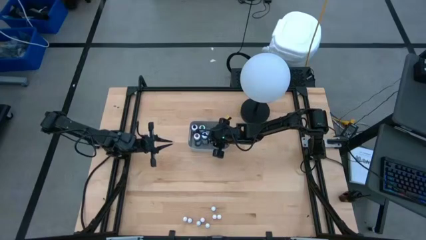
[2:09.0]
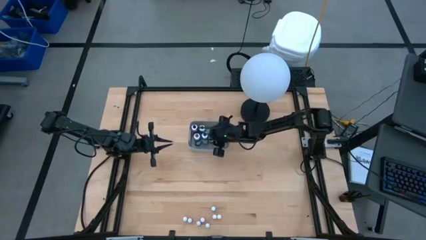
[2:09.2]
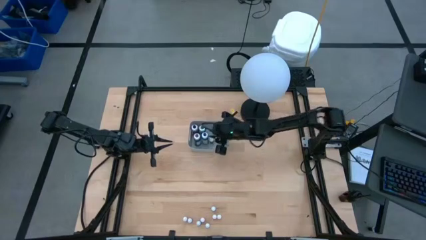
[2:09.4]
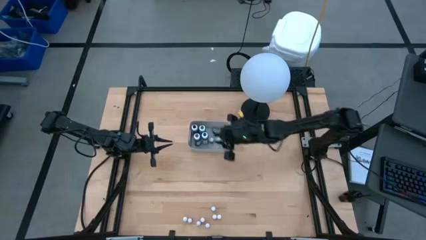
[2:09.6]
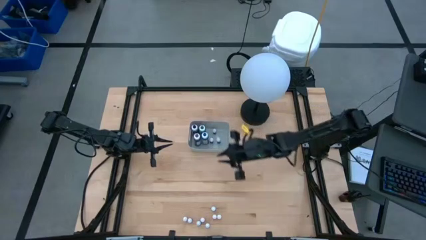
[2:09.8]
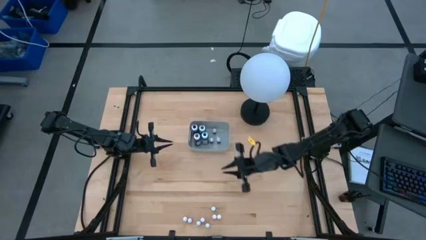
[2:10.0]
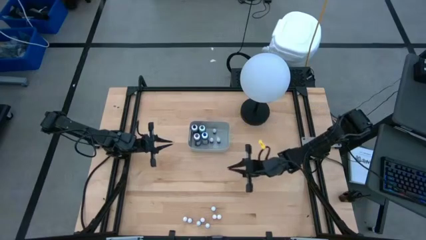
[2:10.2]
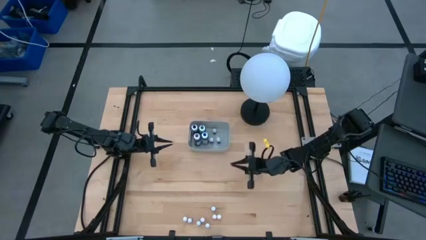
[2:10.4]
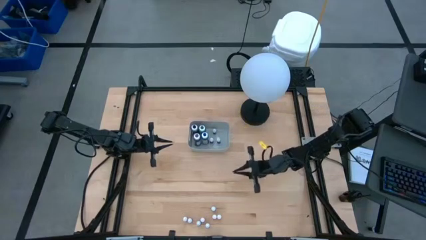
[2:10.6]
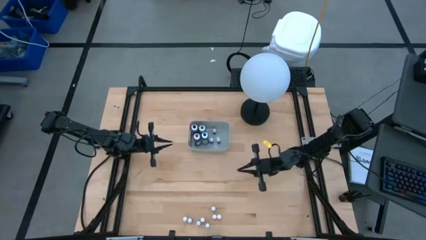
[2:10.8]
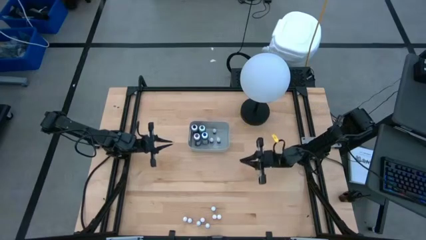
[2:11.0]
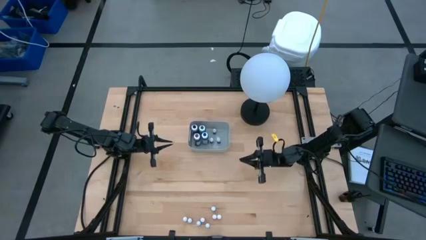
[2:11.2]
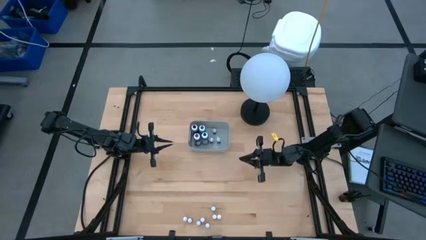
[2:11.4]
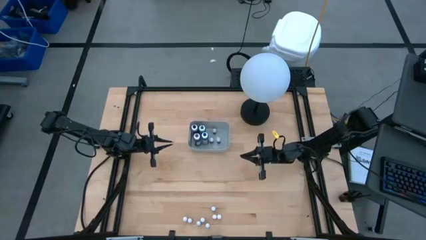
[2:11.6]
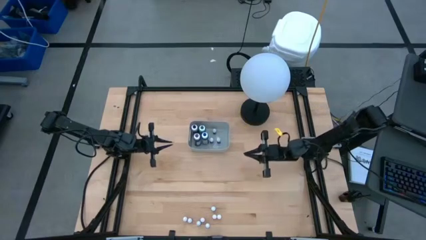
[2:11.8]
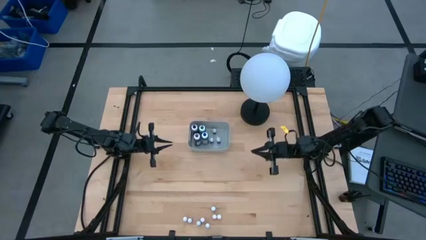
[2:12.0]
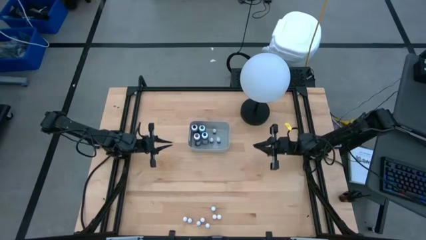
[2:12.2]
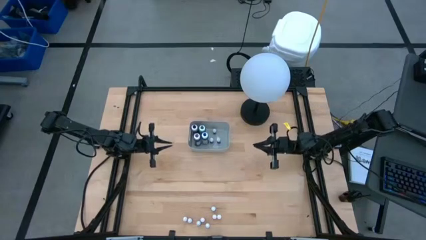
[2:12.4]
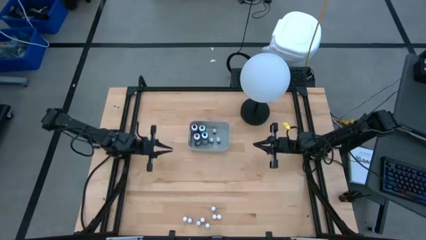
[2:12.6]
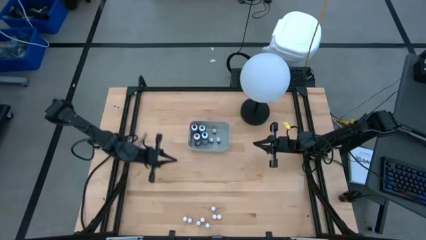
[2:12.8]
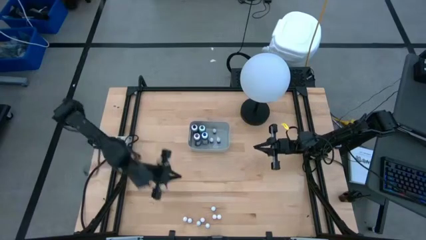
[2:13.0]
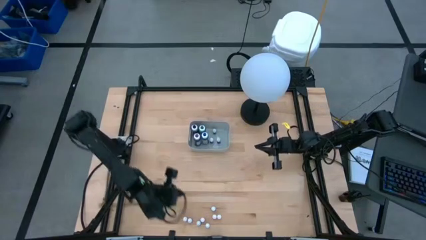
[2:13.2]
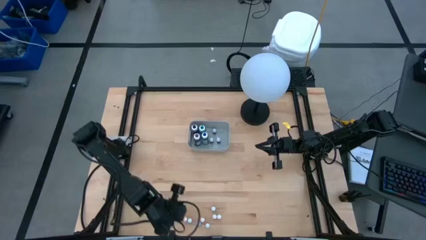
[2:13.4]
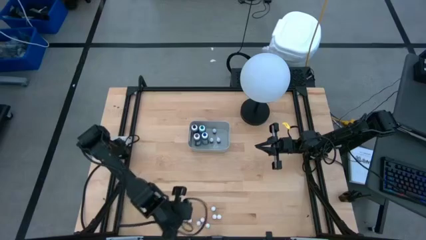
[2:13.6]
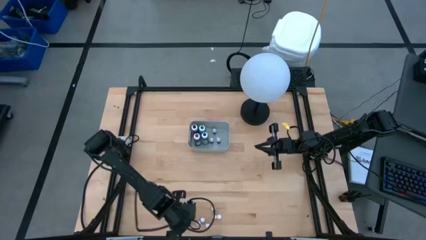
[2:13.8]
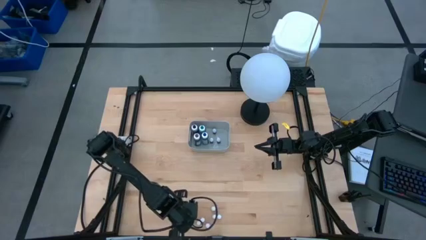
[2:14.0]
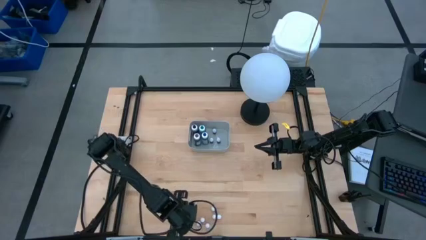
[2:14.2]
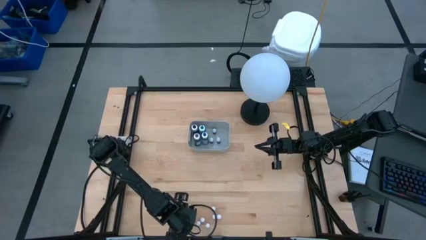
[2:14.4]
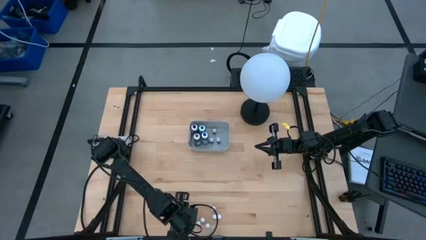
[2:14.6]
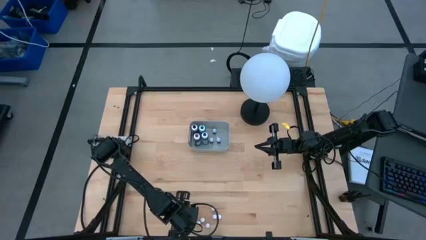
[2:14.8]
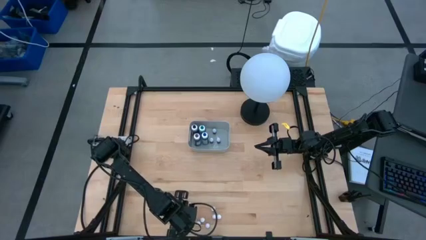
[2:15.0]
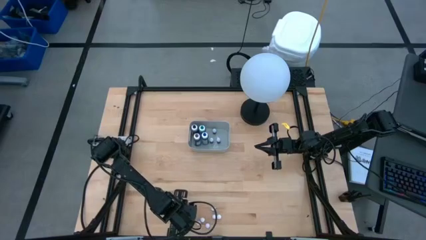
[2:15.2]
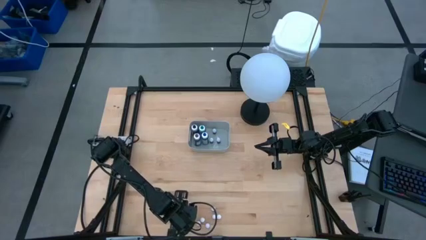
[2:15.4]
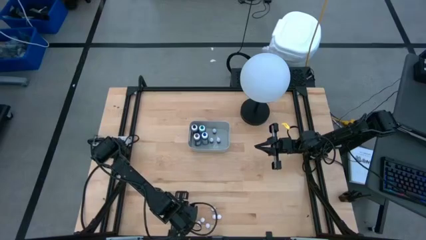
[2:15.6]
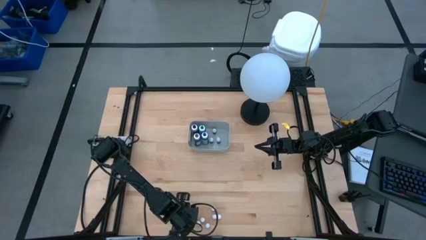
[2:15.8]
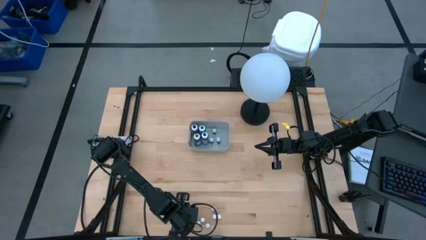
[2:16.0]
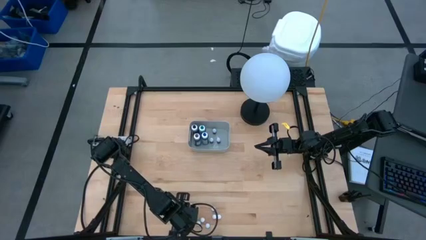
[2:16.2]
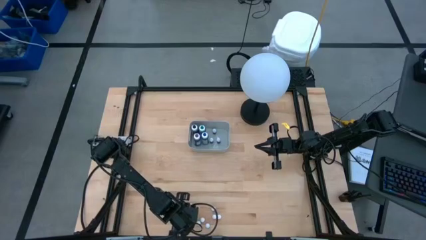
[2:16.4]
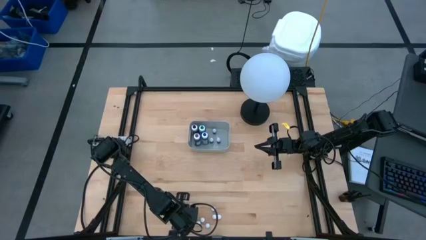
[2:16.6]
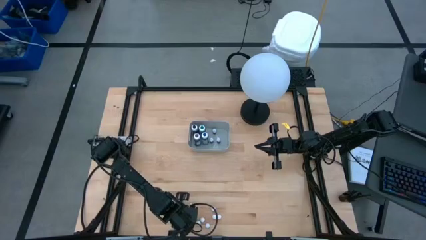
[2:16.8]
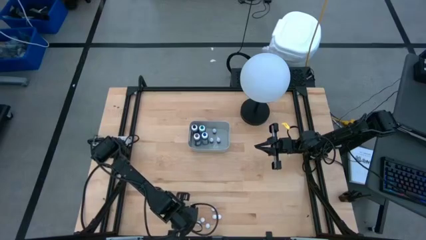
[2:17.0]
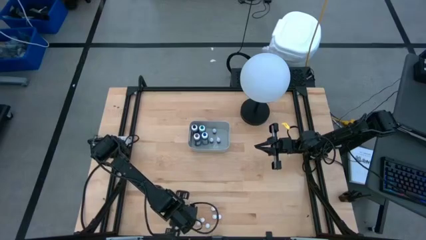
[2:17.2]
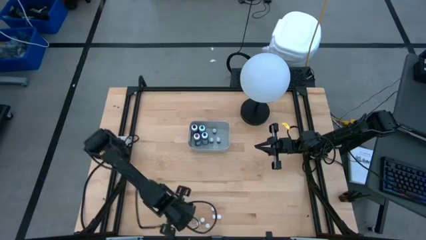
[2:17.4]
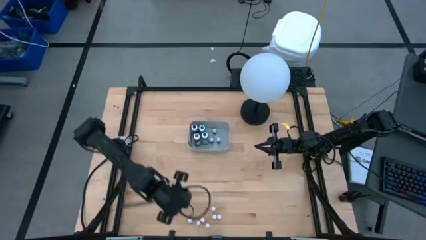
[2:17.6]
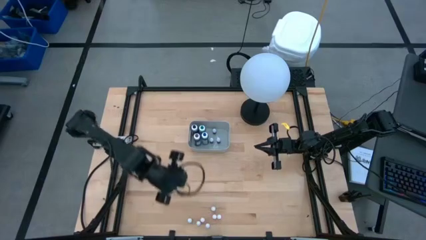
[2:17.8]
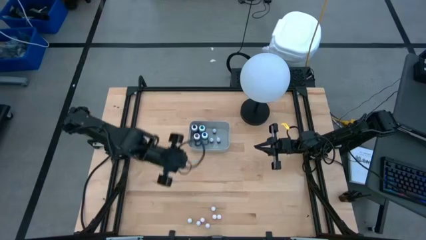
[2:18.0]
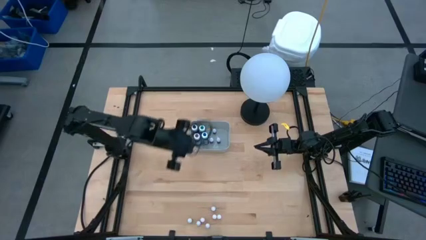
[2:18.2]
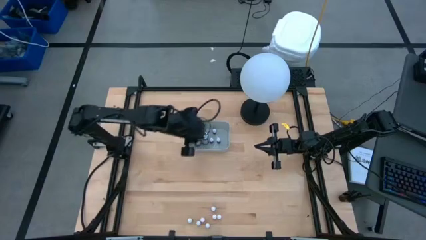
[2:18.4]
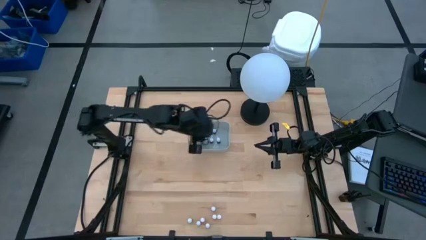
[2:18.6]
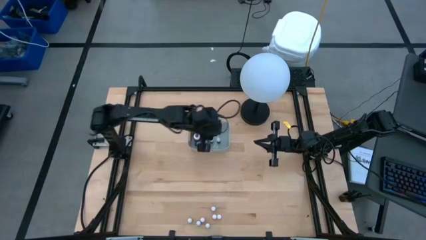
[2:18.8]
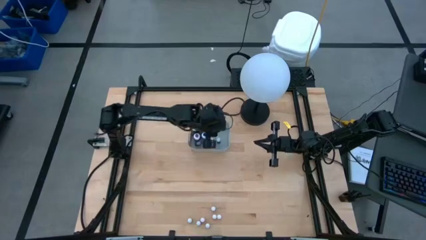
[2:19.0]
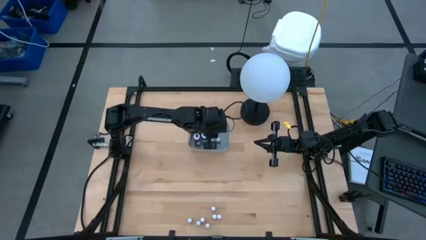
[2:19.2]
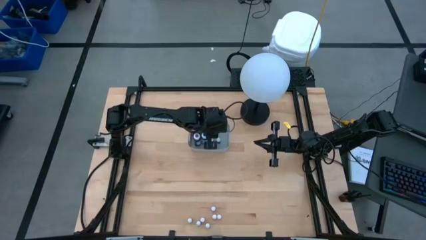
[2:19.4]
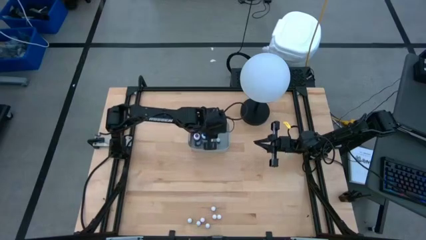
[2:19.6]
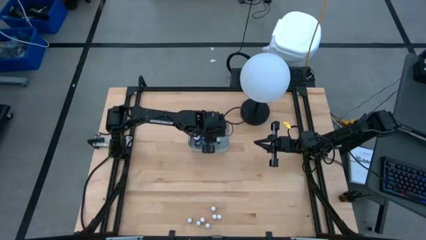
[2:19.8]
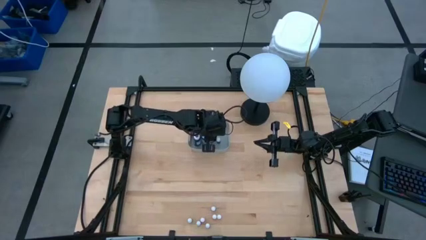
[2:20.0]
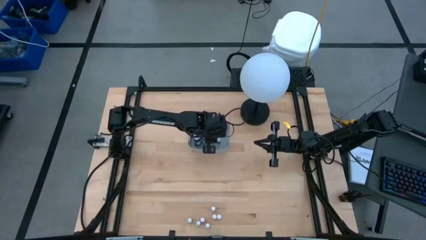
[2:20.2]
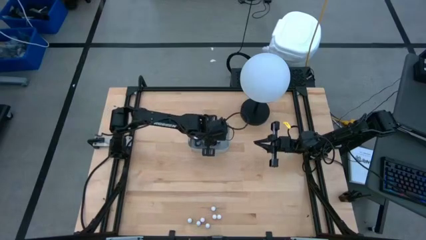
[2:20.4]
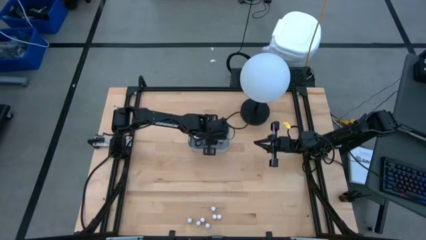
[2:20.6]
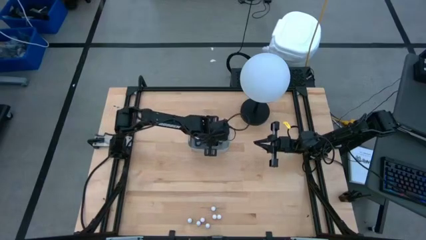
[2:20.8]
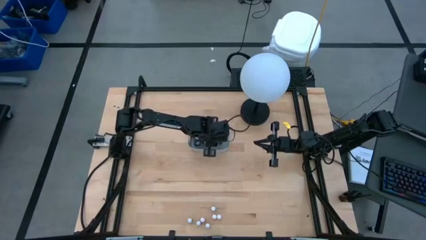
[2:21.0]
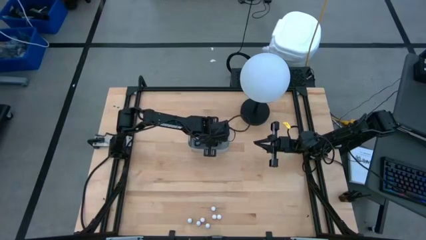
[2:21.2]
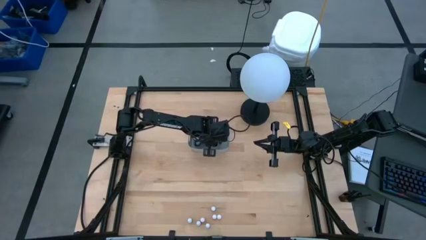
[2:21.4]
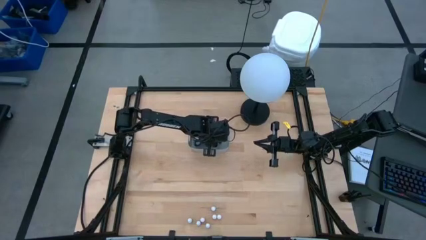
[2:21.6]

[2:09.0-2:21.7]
Task: Pick & Place food coloring
Put the small yellow food coloring bottle into the gray bin

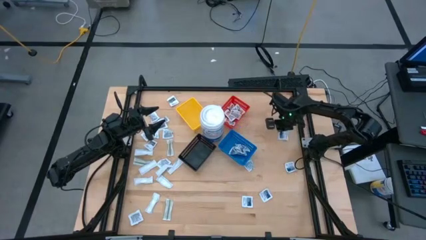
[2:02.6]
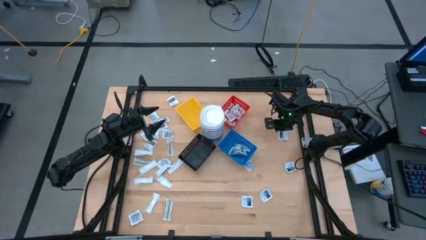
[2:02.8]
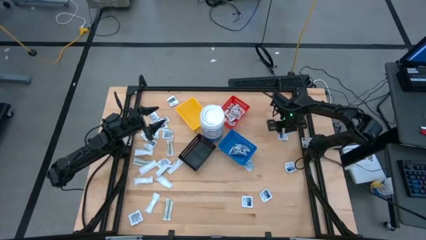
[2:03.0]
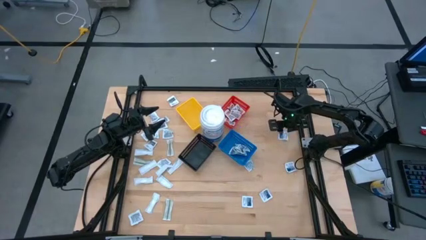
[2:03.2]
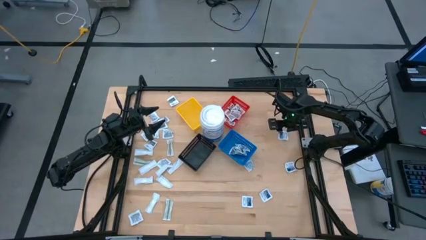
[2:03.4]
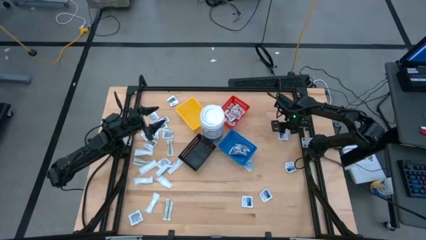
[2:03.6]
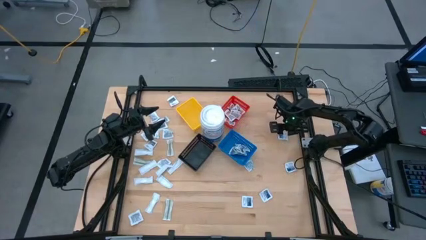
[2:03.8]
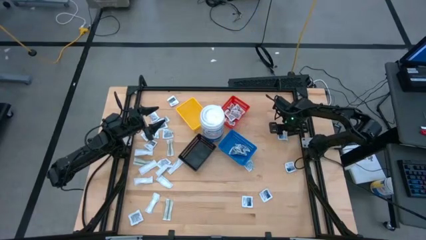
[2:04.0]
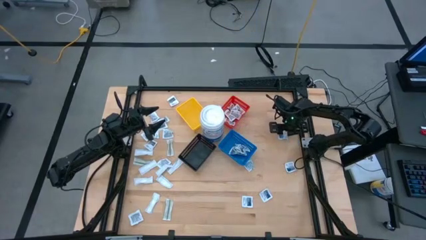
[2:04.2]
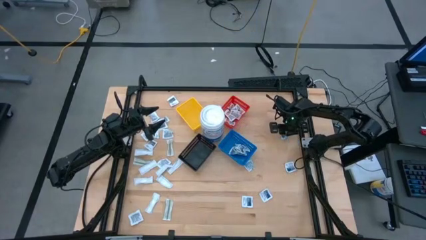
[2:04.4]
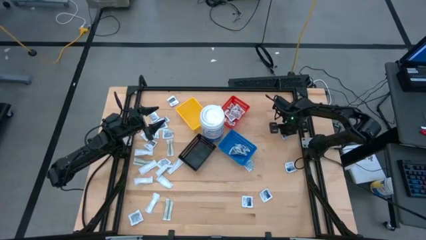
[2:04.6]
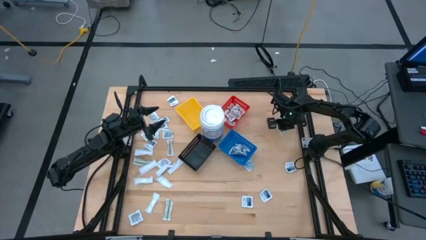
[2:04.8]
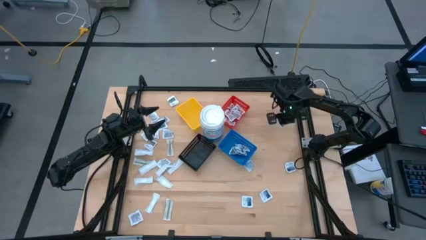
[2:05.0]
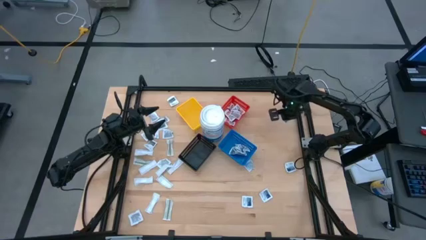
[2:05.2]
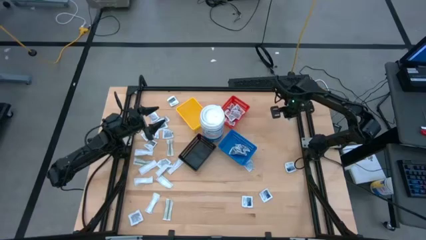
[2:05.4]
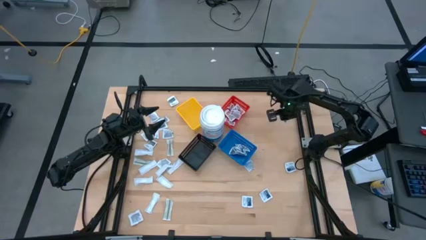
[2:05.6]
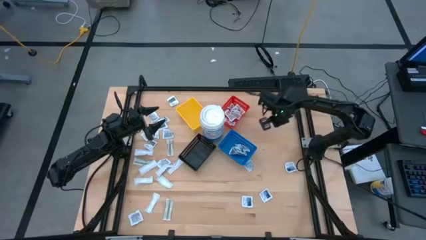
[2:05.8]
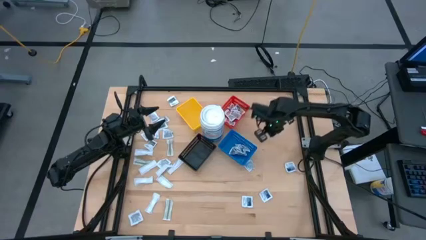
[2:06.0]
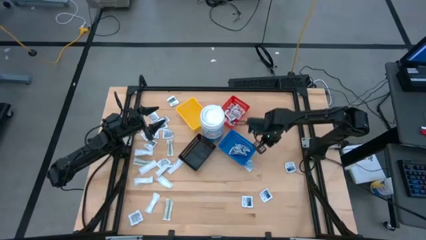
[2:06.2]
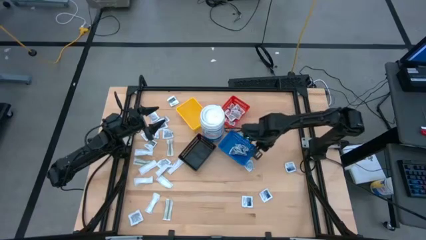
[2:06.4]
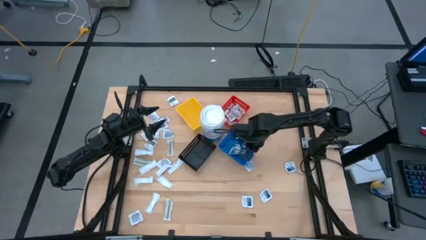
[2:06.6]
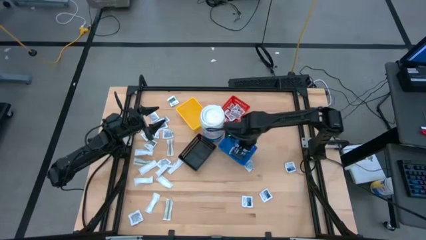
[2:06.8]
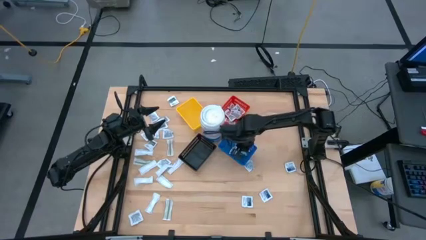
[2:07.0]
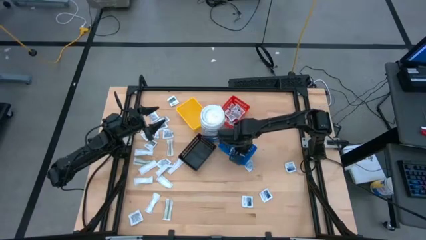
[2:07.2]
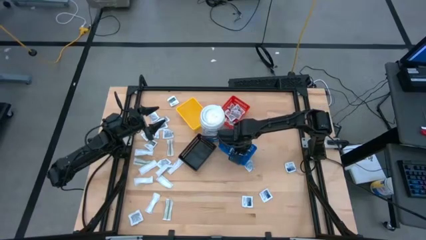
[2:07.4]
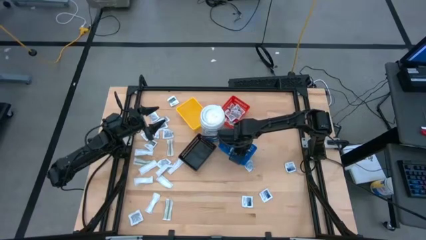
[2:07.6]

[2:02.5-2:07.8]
Task: Pick & Place First Aid Supplies
Put the alcohol pad into the blue bin
